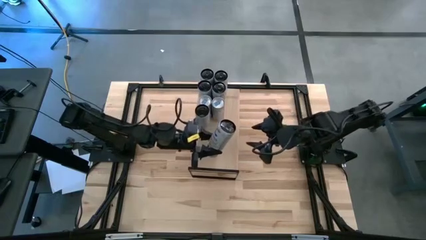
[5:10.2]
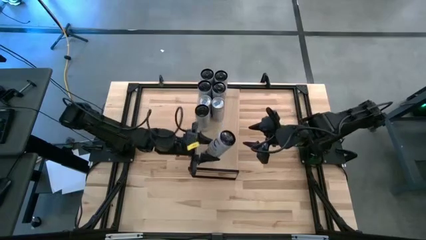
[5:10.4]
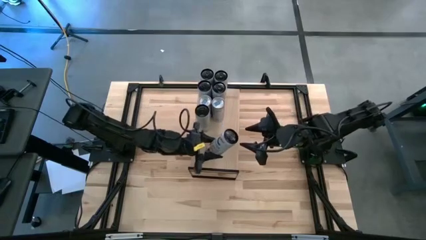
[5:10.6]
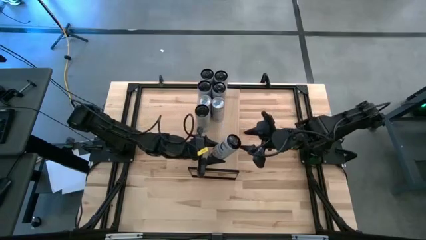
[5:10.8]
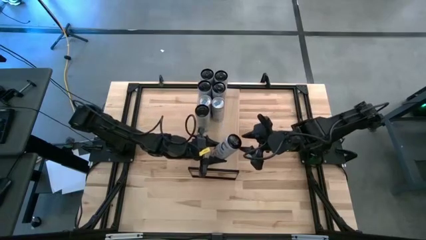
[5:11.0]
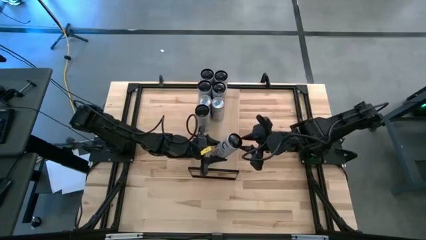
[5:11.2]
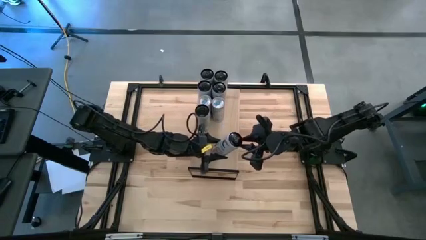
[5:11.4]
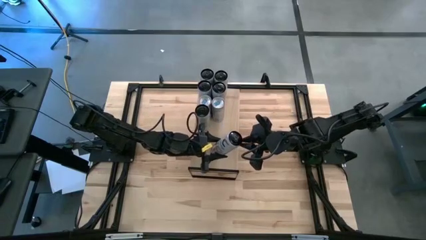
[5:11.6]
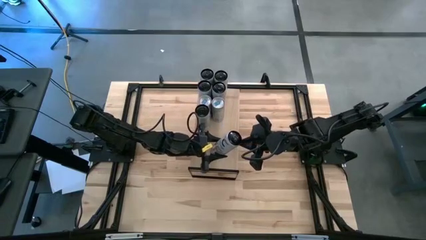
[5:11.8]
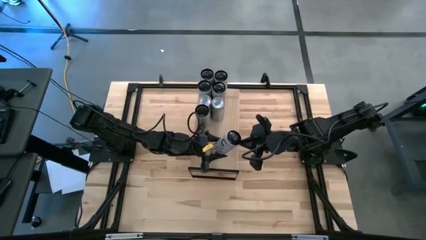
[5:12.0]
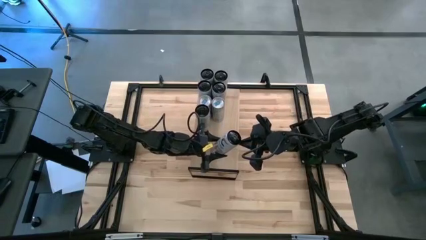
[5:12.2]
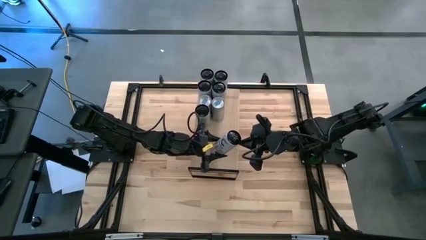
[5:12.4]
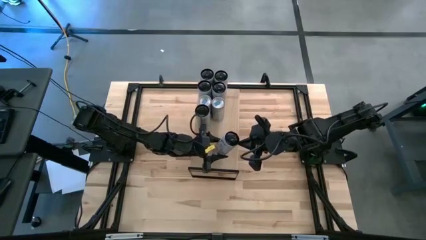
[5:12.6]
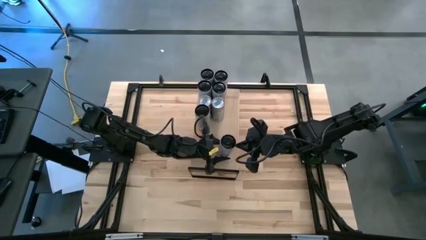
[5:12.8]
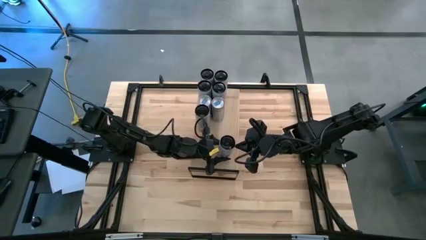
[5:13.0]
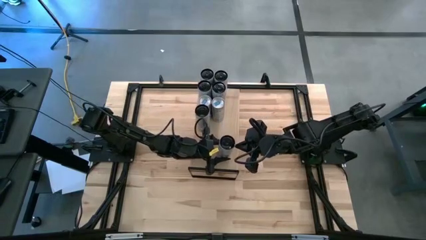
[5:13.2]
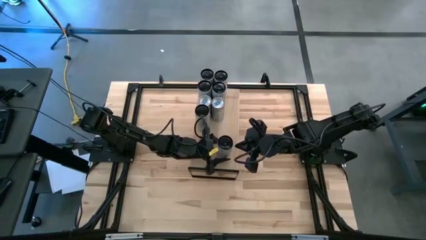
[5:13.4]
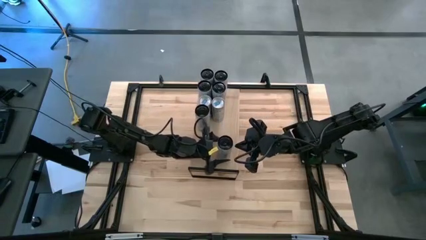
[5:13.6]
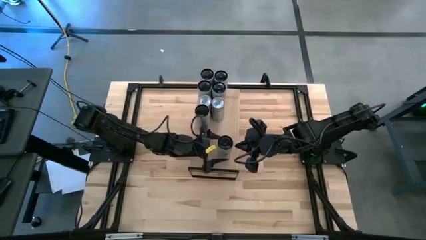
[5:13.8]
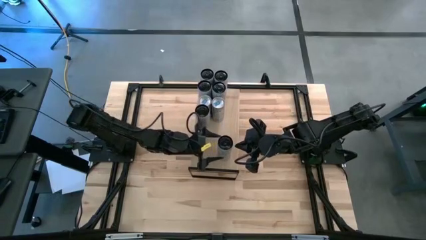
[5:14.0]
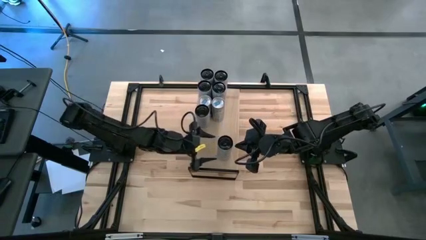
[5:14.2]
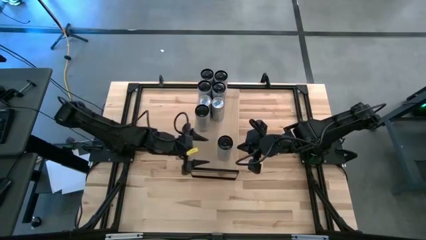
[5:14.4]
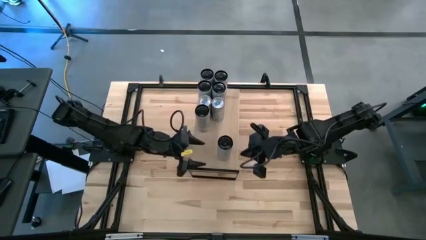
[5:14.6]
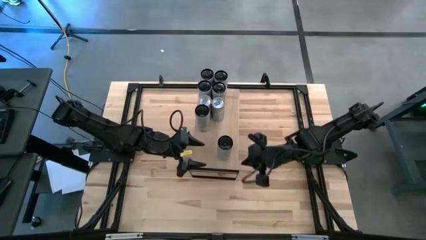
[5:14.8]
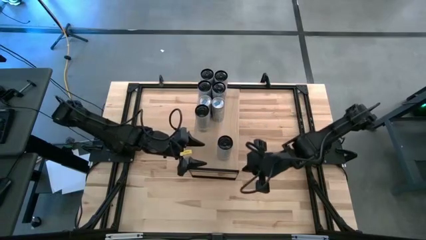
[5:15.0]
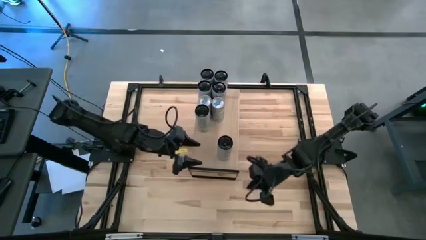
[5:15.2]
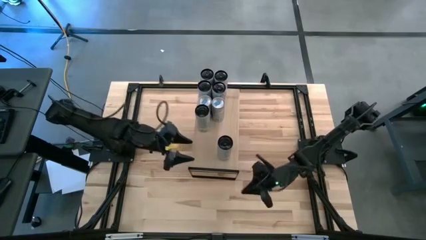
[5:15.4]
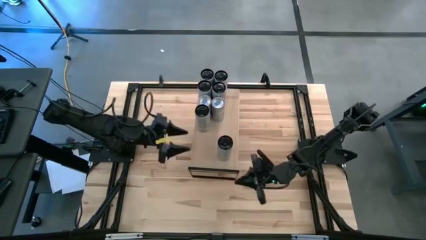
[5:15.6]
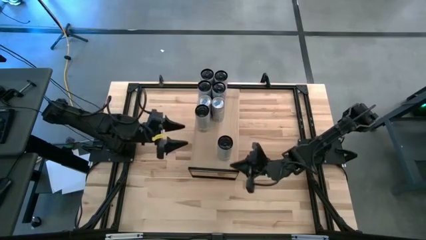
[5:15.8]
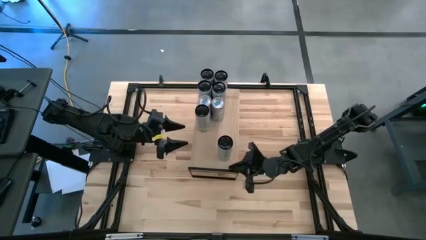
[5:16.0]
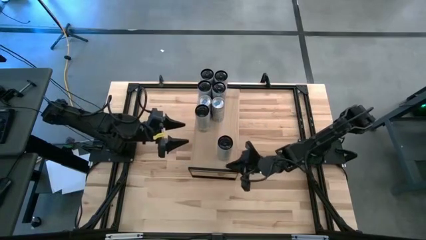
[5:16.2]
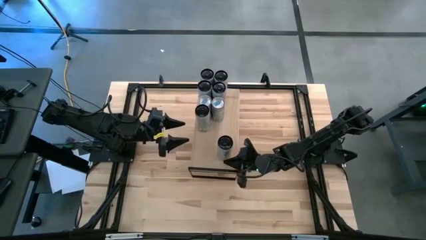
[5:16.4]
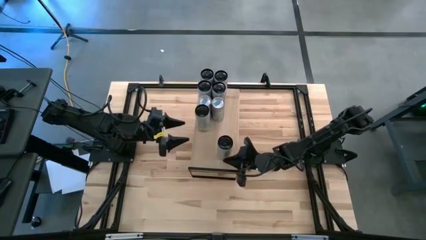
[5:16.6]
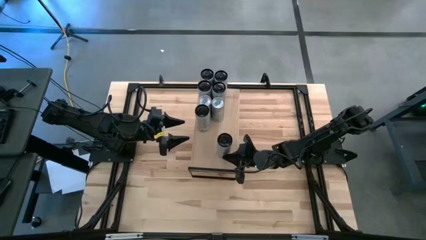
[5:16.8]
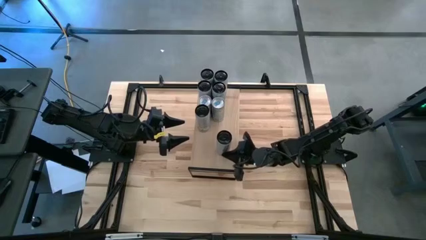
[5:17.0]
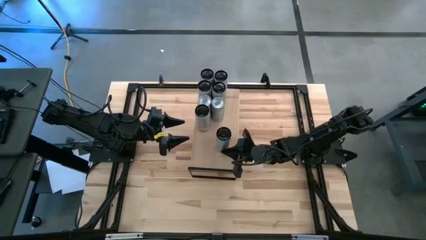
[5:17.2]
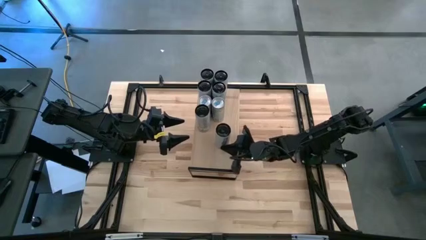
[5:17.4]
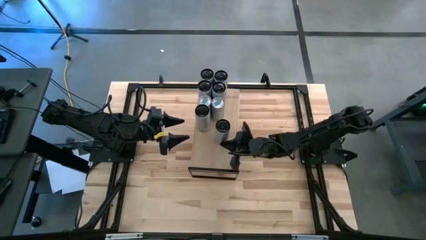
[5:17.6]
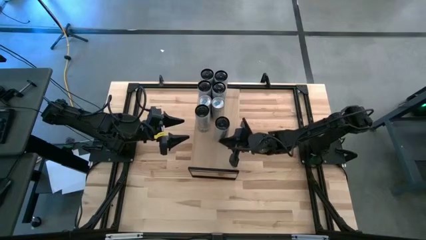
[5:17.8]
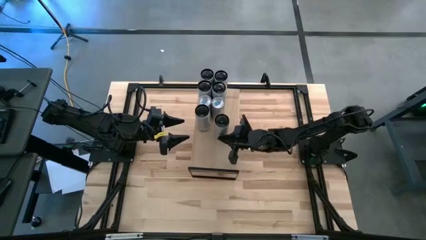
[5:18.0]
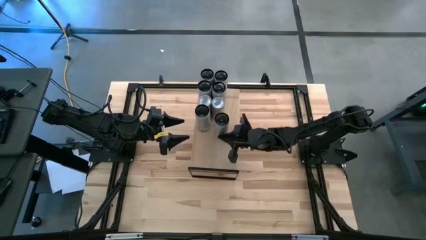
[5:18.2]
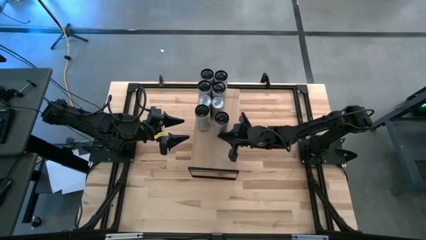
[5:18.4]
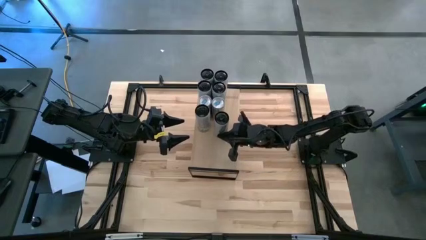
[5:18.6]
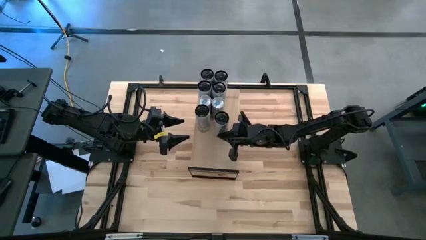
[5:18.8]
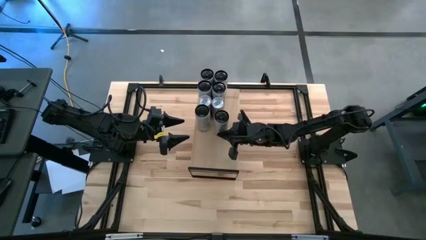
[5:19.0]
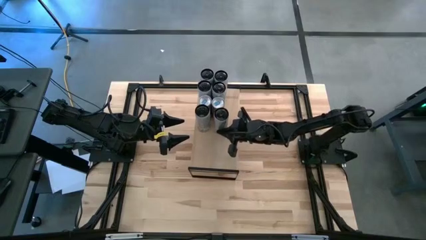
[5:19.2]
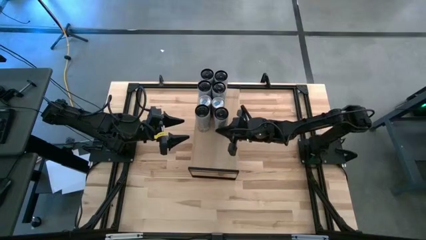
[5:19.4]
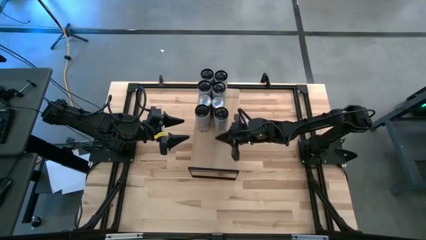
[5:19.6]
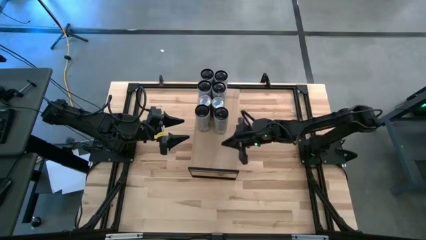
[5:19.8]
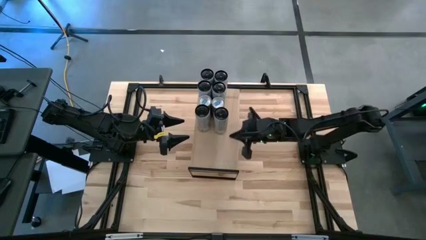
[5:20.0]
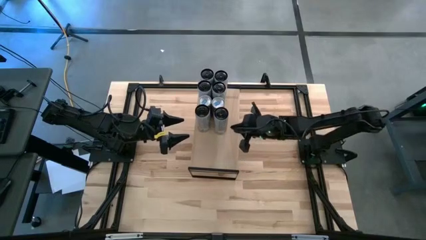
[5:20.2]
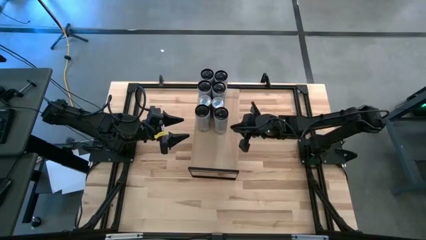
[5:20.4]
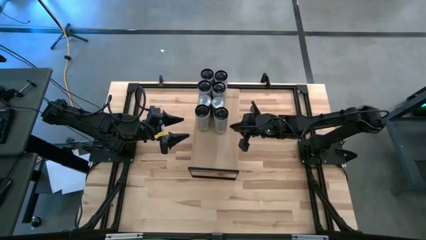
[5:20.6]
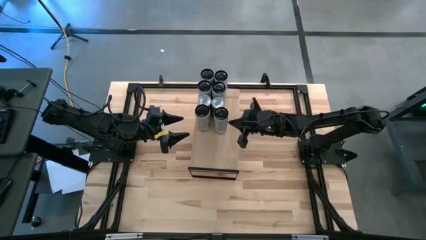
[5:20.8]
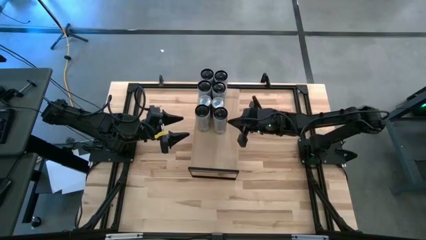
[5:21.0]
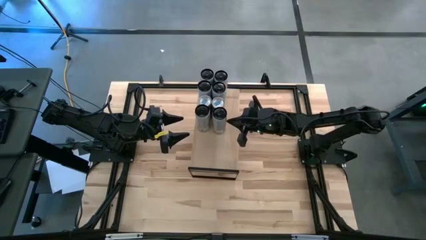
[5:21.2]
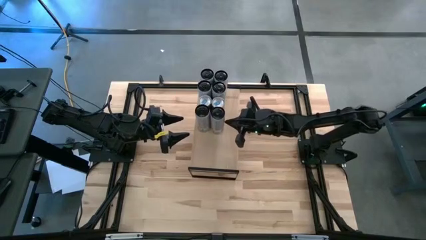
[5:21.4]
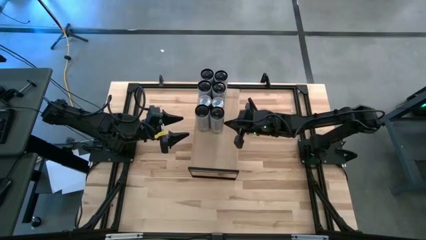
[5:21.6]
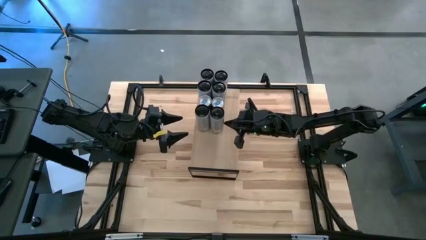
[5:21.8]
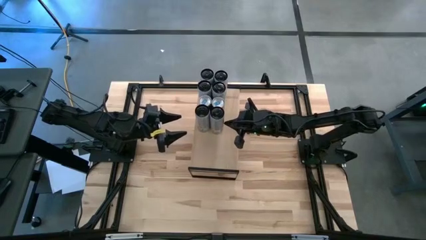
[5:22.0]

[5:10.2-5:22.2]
Task: Place canned beverage on shelf
Put the white yellow soda can on the shelf aligned with the white yellow soda can
